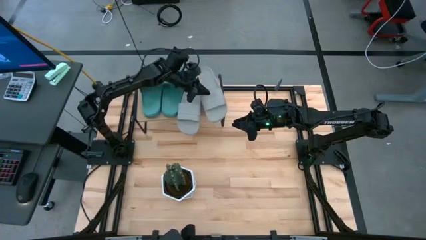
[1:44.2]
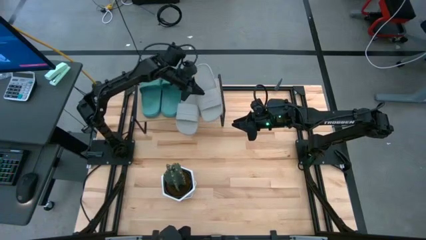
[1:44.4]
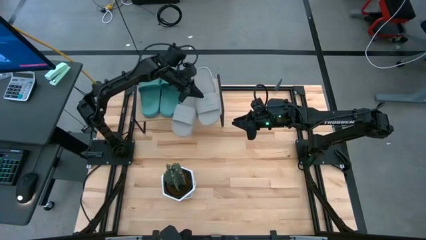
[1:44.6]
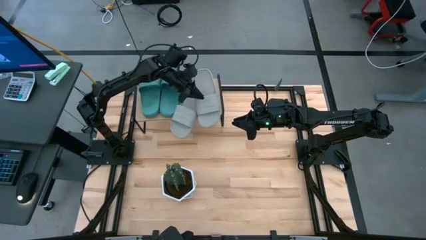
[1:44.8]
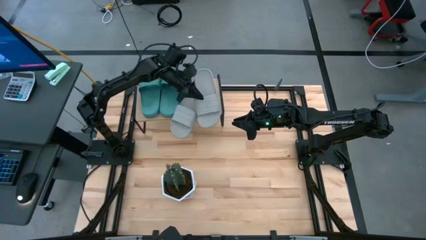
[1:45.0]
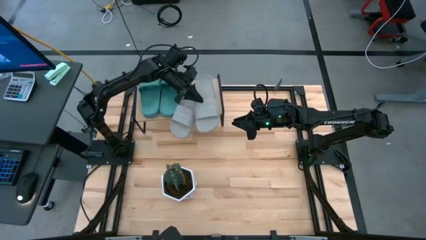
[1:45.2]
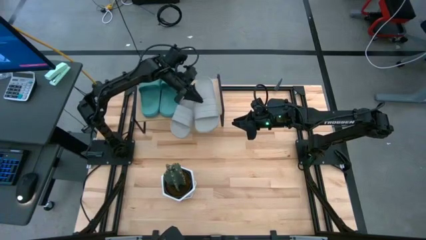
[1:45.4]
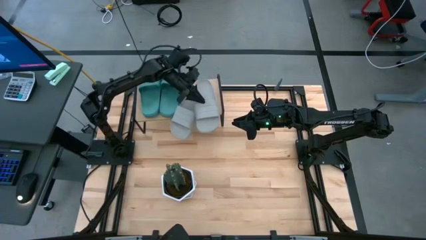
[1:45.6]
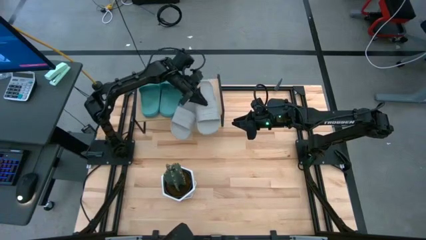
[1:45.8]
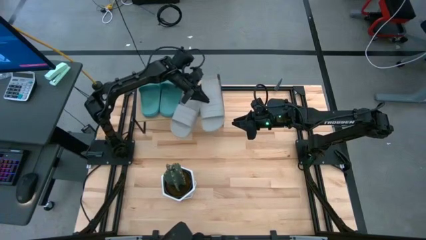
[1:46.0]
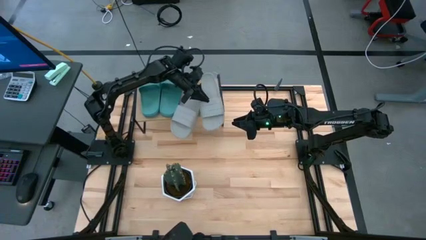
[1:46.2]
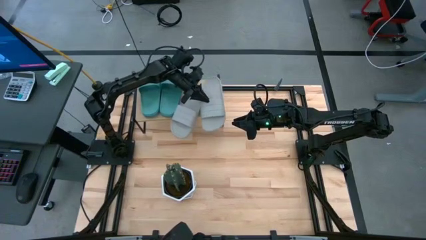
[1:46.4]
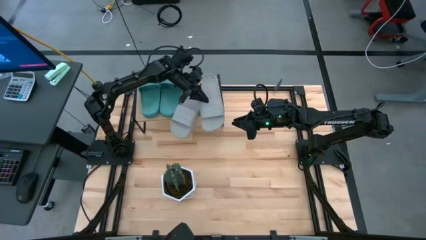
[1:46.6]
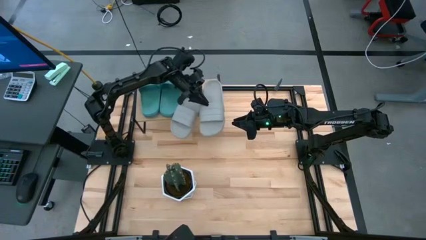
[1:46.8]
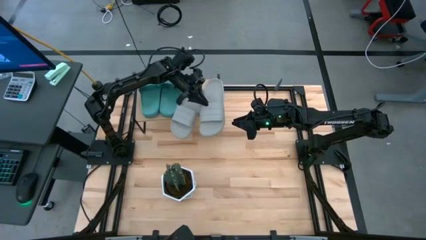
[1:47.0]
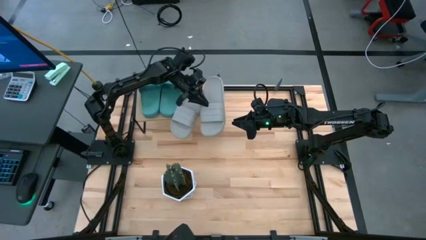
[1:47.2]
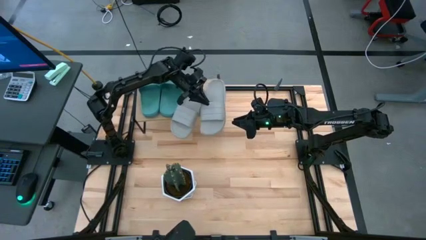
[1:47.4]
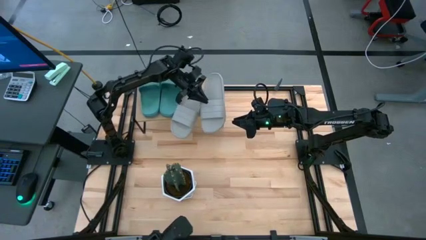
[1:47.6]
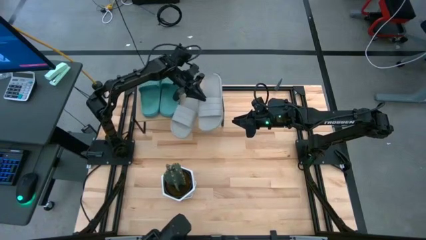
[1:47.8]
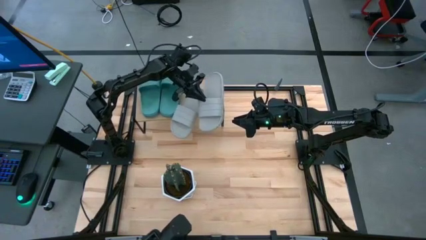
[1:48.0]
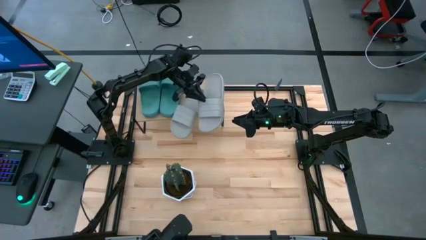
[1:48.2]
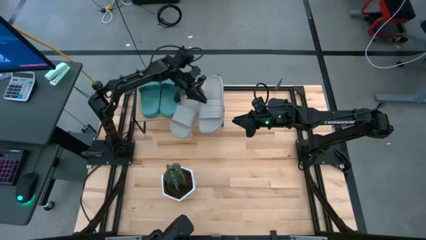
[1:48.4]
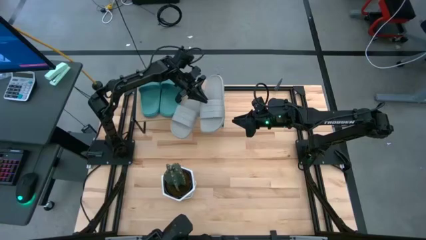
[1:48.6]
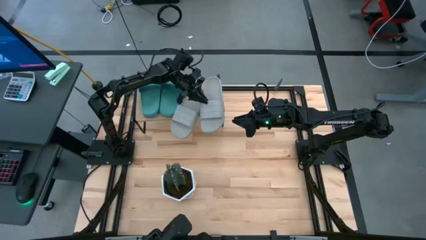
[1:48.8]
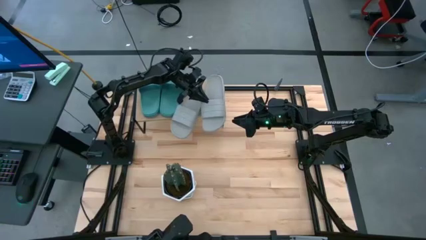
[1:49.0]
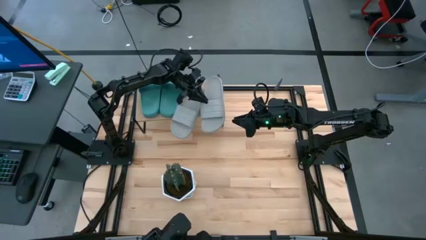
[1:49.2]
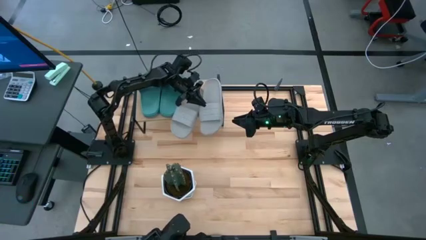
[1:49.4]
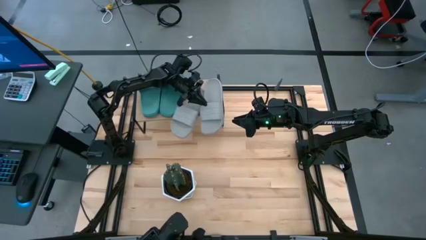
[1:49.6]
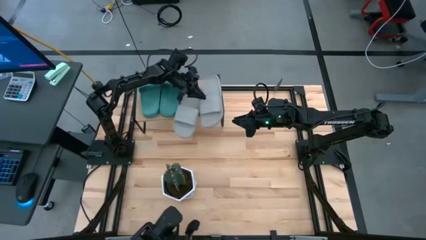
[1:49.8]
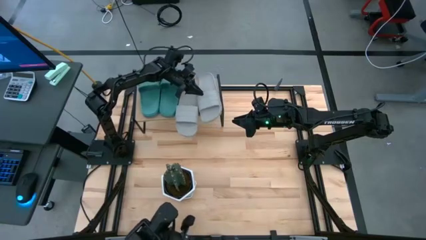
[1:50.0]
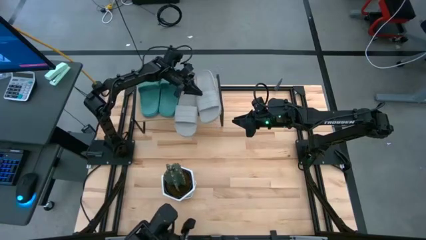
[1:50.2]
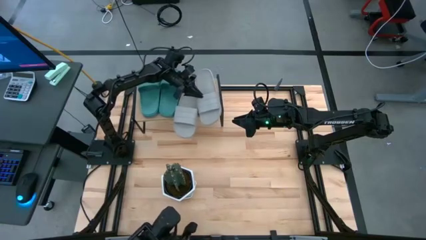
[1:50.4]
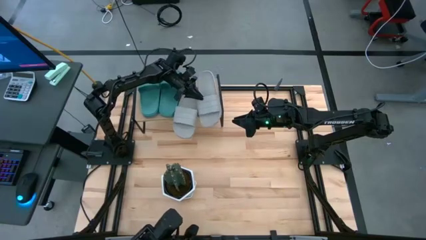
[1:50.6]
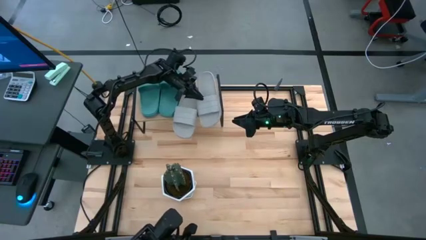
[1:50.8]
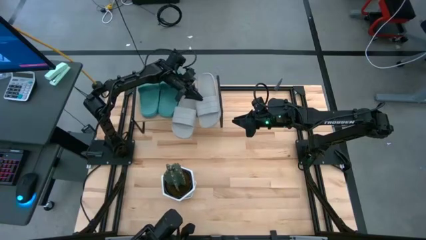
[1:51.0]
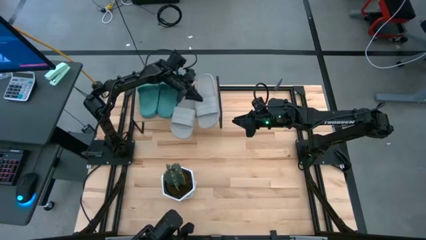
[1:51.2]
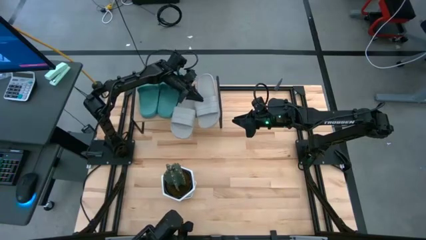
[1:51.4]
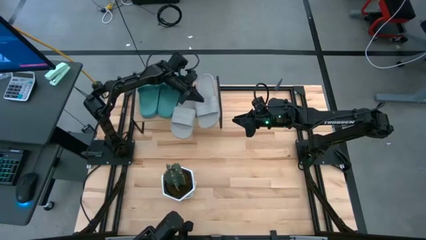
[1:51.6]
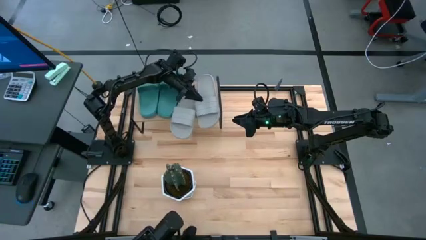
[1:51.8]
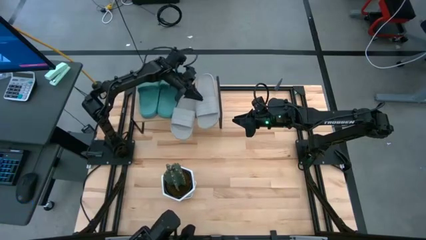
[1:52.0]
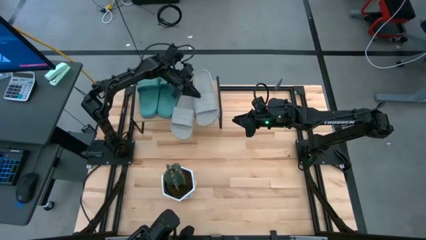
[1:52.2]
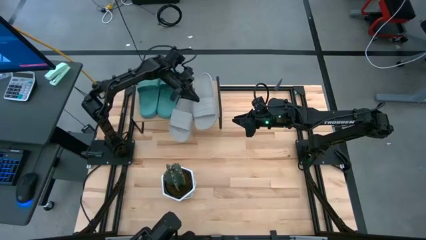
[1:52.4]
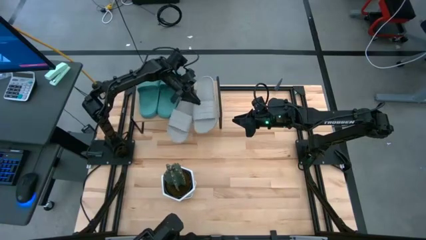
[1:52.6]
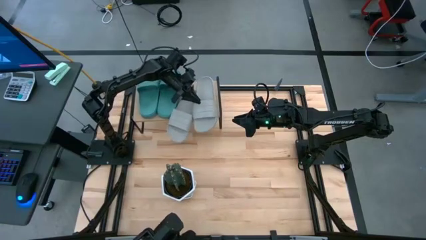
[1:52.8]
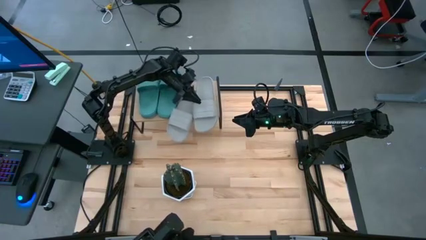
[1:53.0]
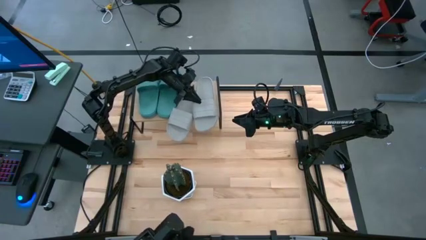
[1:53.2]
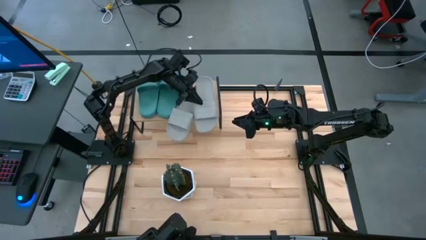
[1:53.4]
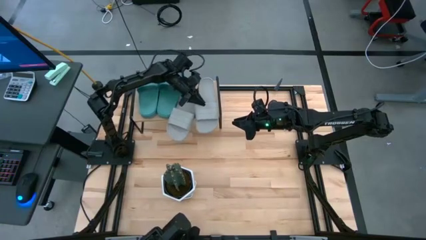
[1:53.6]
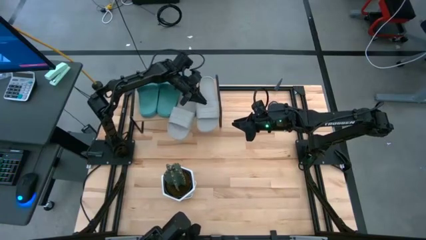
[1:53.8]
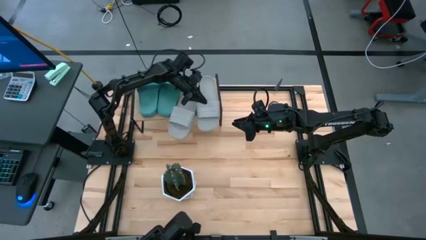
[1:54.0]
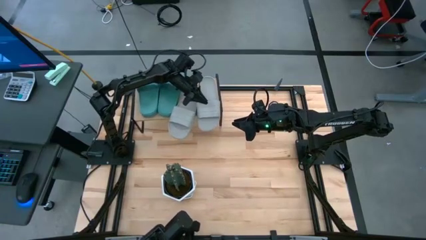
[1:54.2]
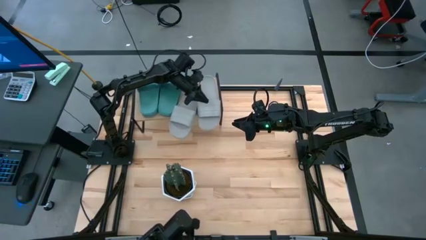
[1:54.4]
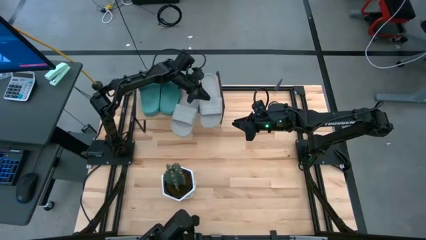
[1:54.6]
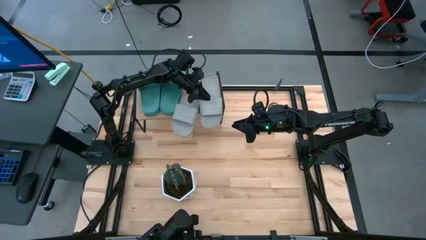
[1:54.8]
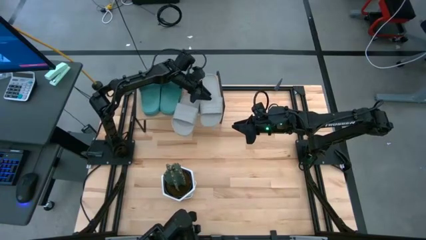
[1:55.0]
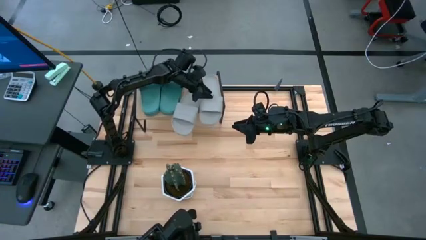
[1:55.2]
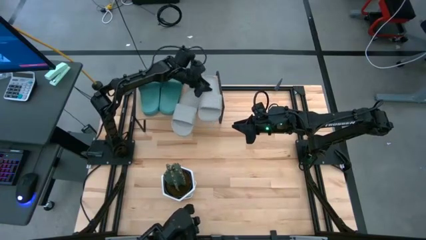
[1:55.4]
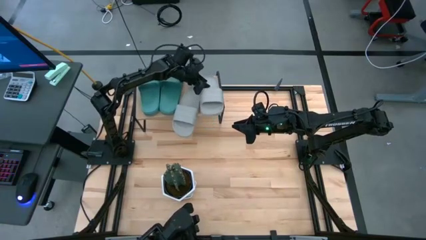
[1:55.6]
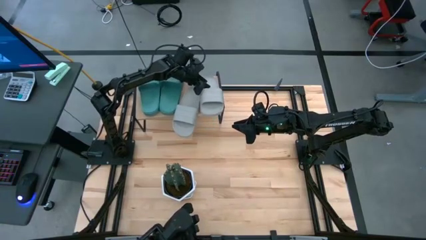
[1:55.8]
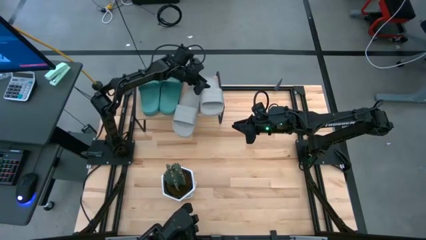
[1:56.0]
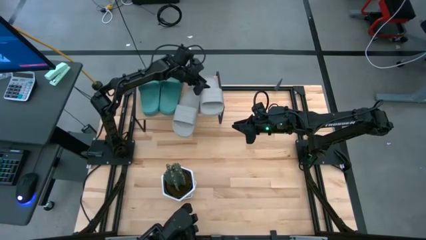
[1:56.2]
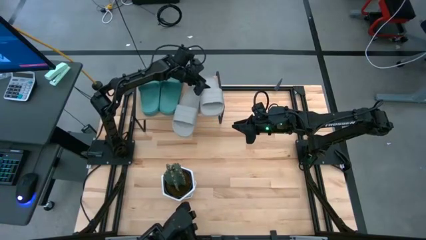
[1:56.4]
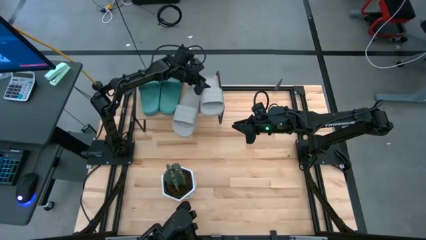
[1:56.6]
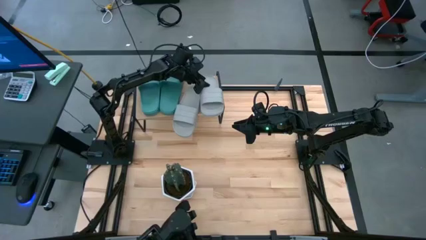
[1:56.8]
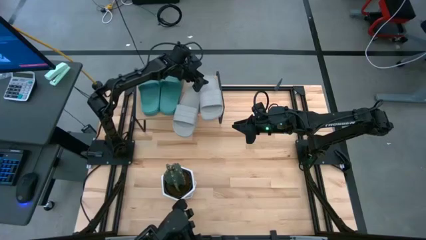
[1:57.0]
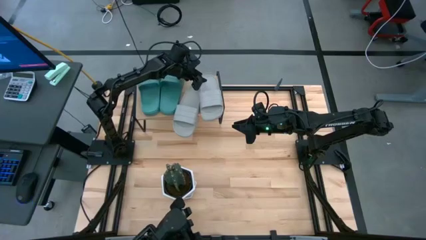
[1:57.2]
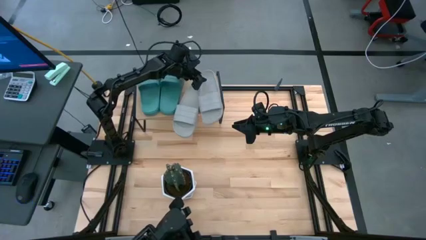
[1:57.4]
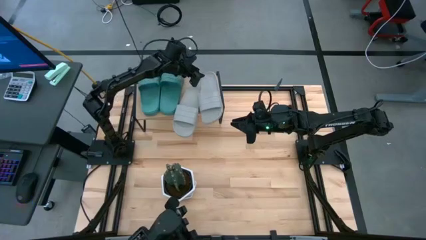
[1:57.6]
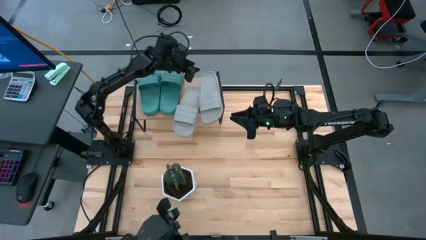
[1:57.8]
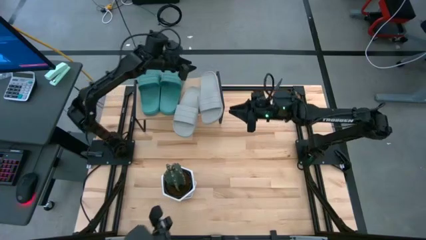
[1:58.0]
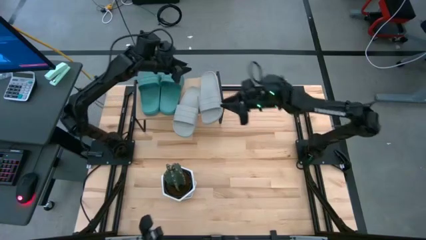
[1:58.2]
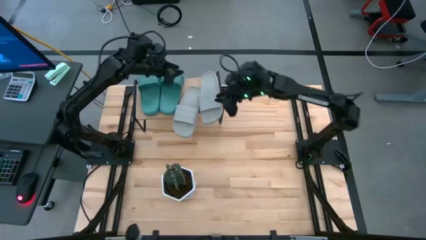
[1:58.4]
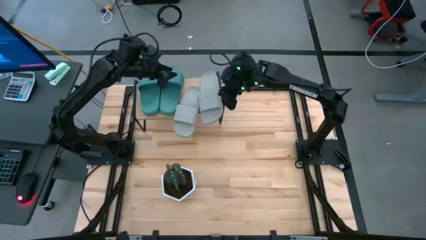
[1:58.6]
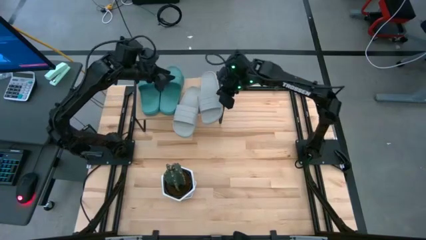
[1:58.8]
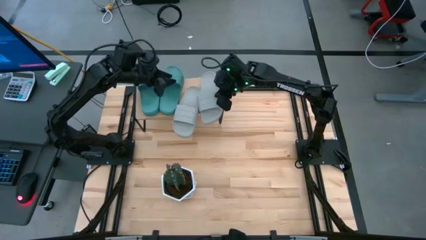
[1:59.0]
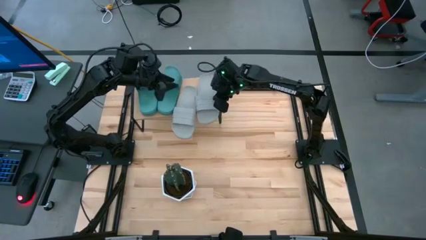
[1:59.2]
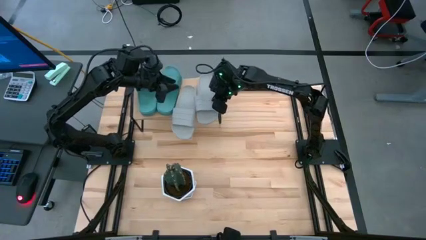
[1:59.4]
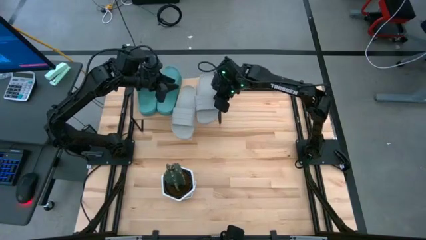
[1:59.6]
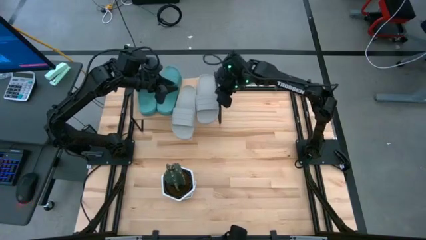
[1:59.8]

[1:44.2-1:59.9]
Task: Pick and place slides into the shelf
Put the gray slipper on the shelf
